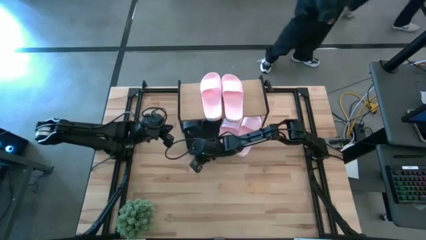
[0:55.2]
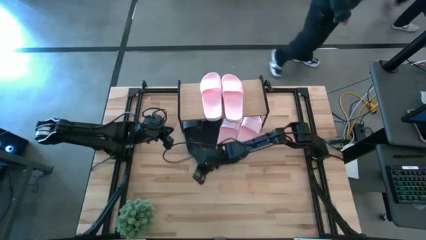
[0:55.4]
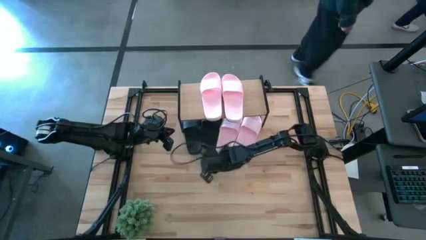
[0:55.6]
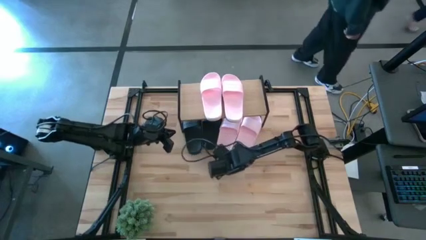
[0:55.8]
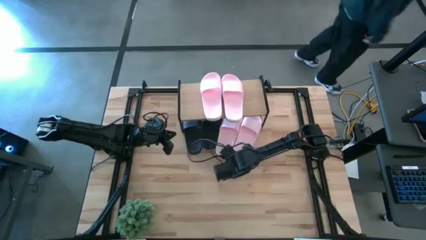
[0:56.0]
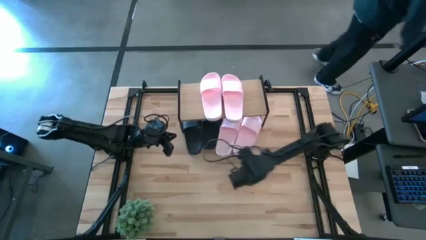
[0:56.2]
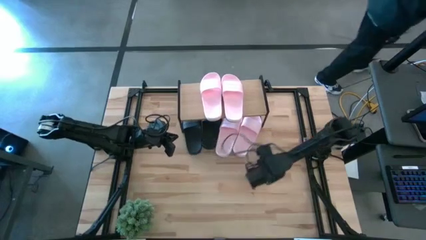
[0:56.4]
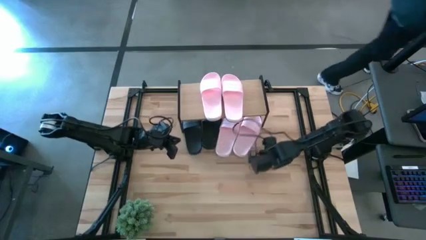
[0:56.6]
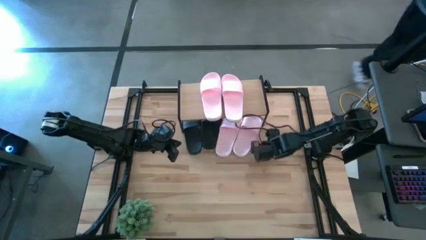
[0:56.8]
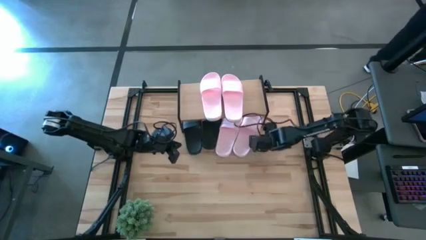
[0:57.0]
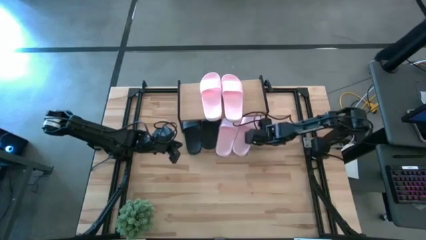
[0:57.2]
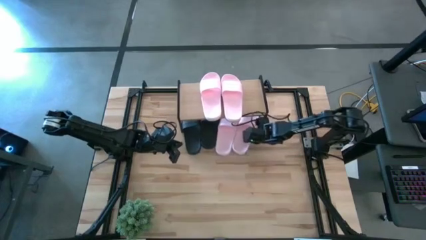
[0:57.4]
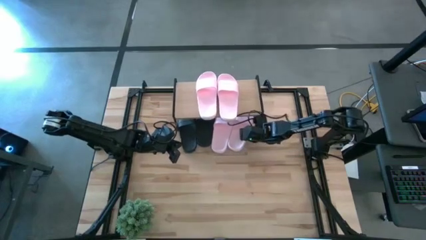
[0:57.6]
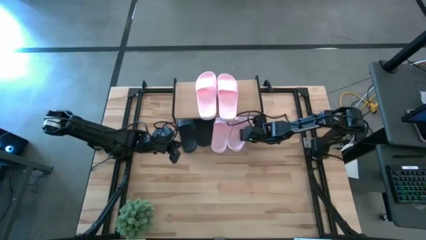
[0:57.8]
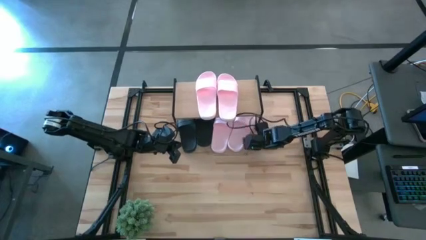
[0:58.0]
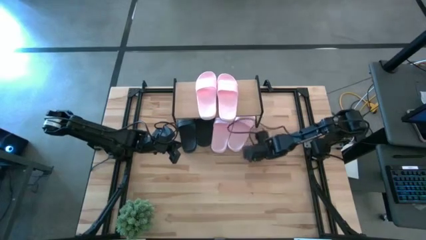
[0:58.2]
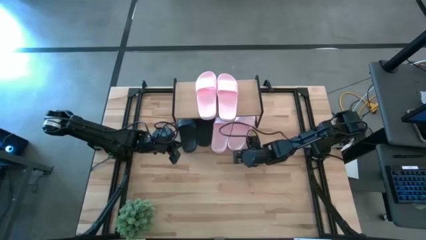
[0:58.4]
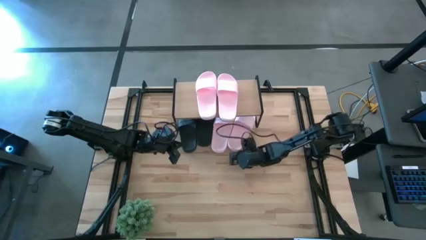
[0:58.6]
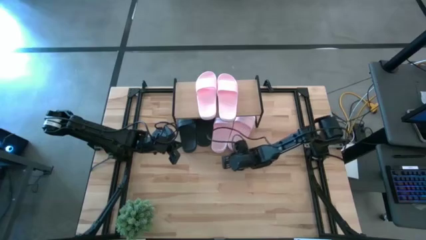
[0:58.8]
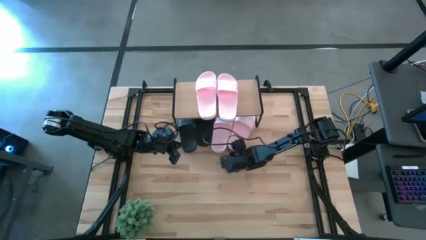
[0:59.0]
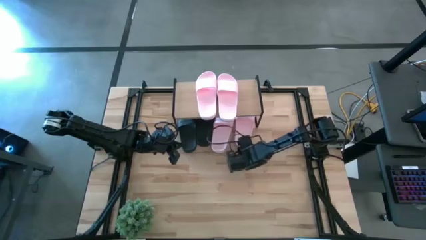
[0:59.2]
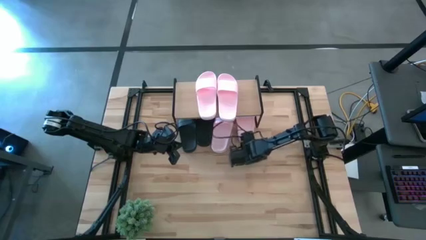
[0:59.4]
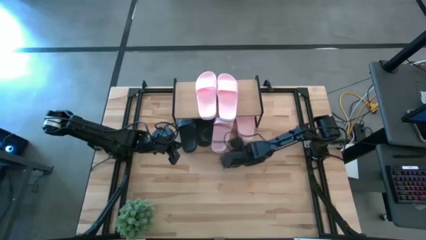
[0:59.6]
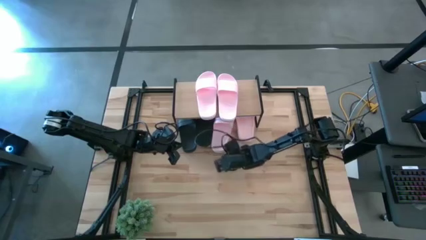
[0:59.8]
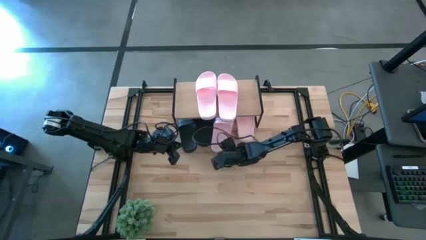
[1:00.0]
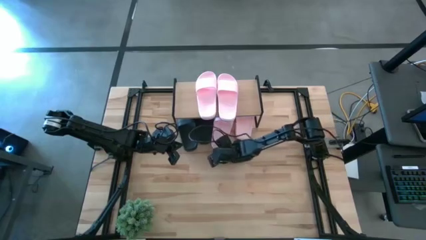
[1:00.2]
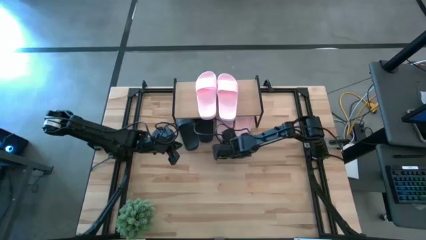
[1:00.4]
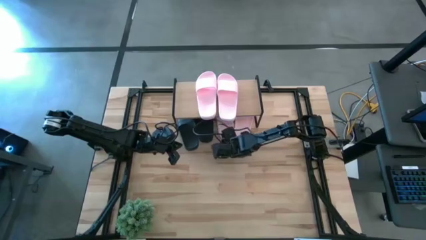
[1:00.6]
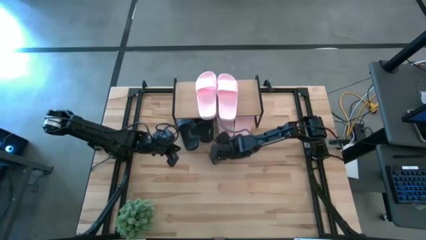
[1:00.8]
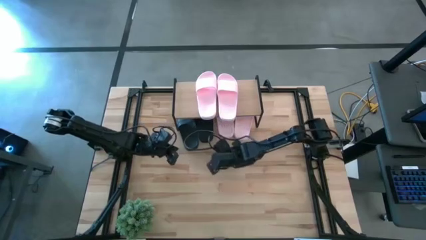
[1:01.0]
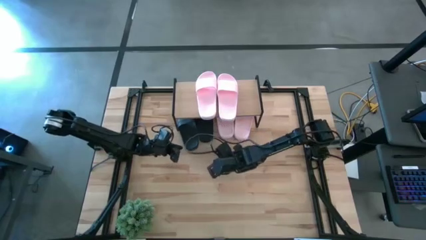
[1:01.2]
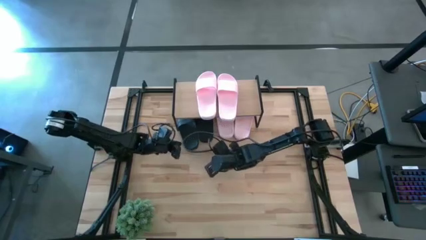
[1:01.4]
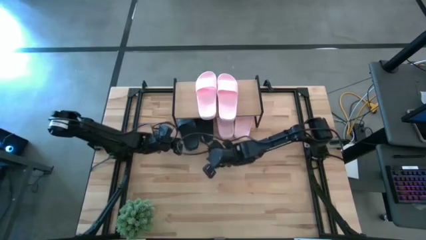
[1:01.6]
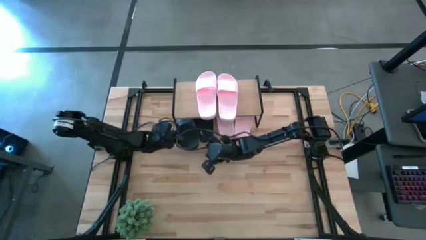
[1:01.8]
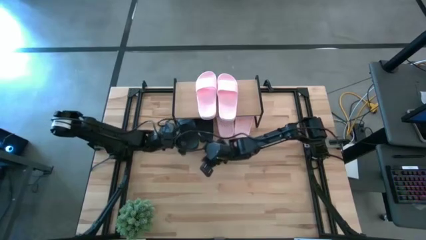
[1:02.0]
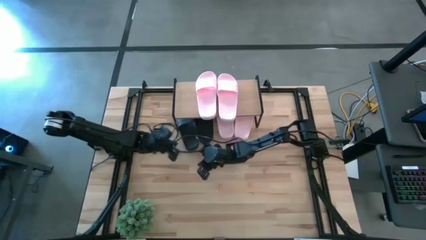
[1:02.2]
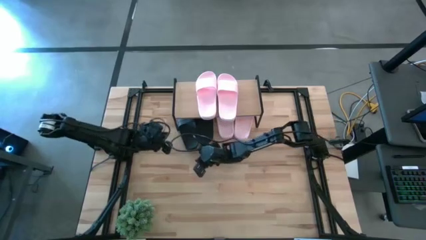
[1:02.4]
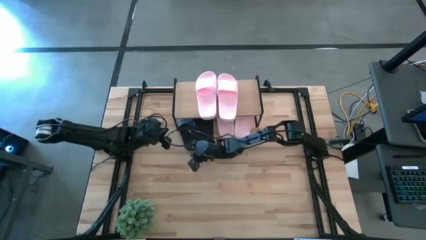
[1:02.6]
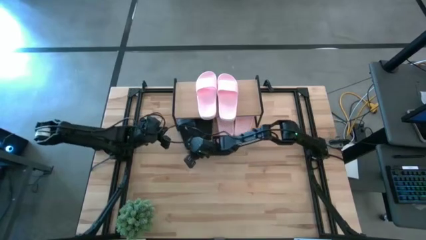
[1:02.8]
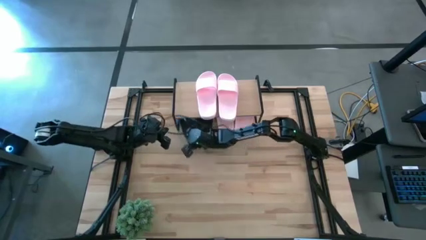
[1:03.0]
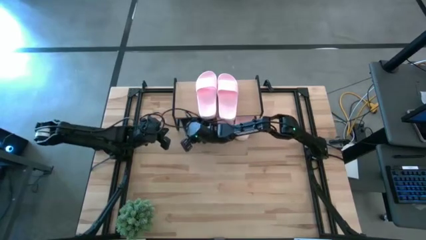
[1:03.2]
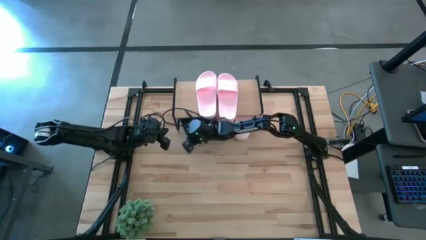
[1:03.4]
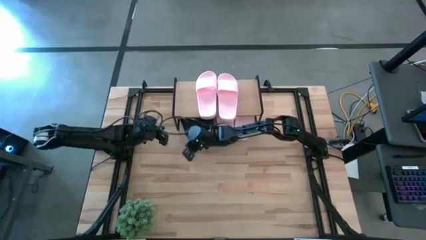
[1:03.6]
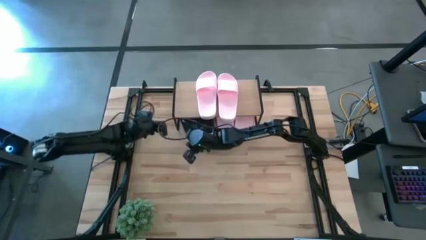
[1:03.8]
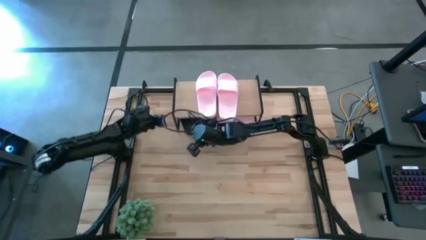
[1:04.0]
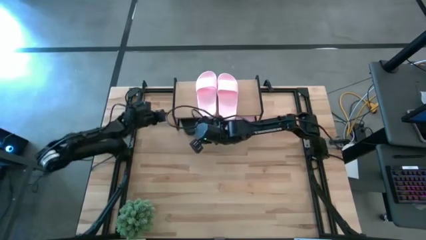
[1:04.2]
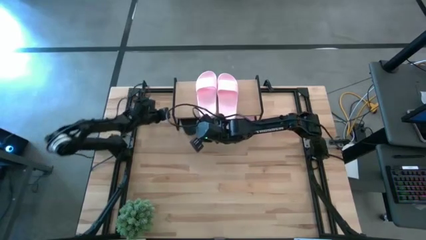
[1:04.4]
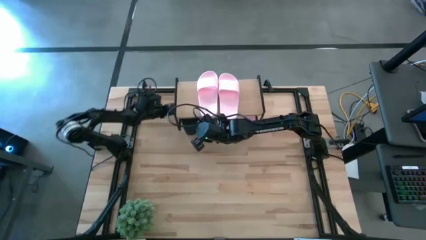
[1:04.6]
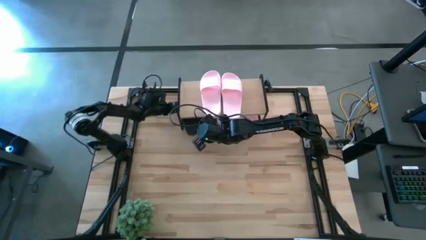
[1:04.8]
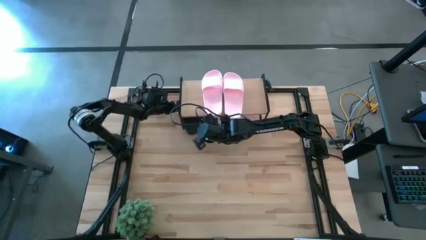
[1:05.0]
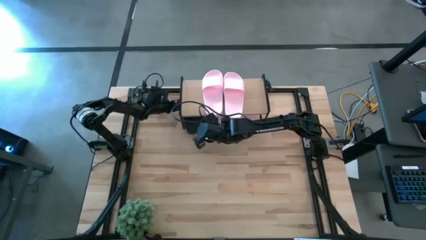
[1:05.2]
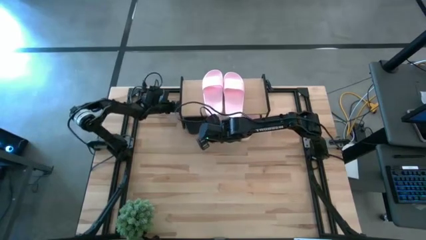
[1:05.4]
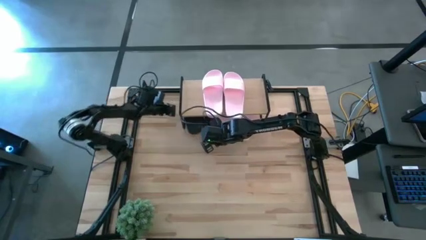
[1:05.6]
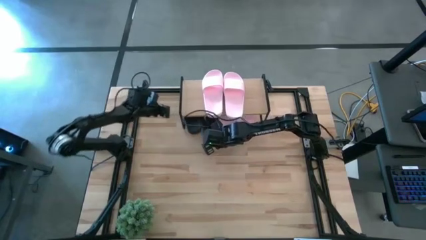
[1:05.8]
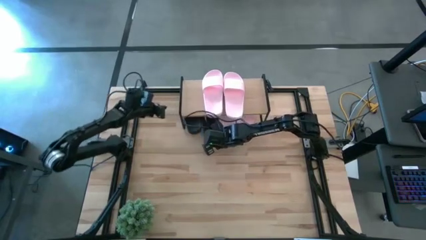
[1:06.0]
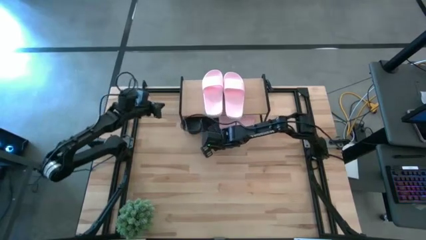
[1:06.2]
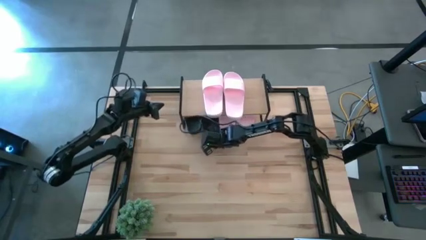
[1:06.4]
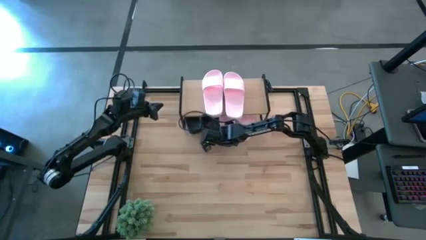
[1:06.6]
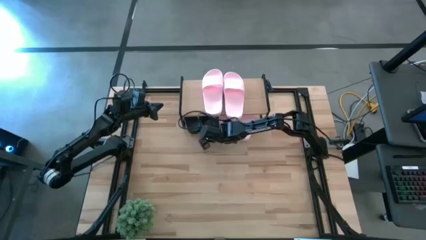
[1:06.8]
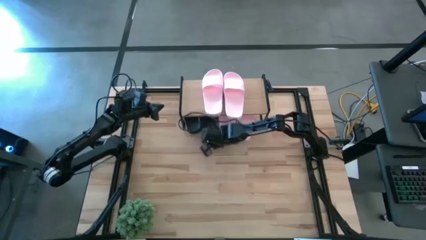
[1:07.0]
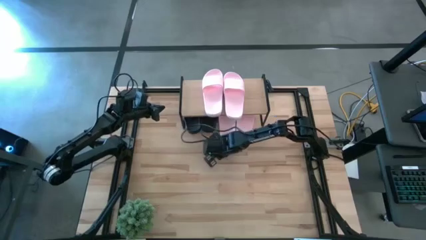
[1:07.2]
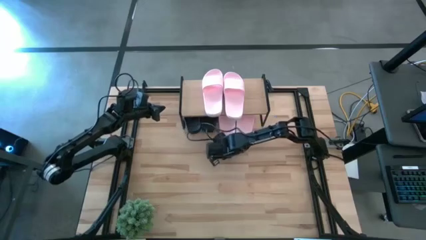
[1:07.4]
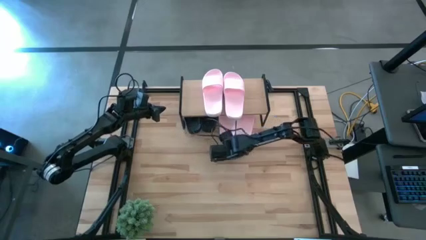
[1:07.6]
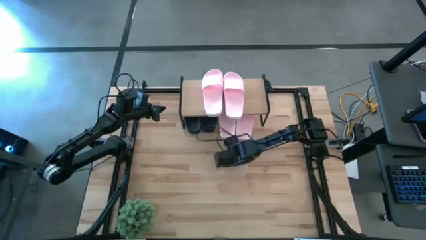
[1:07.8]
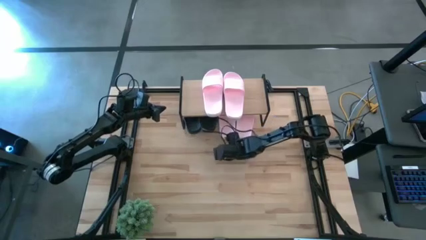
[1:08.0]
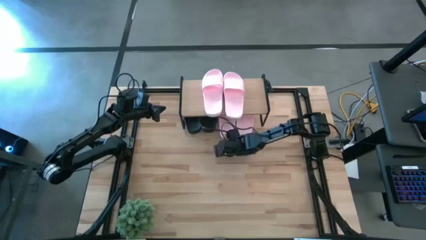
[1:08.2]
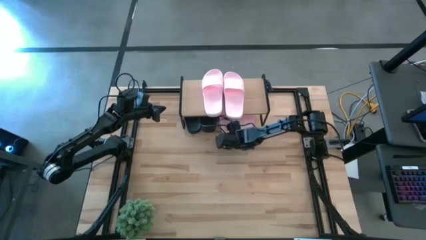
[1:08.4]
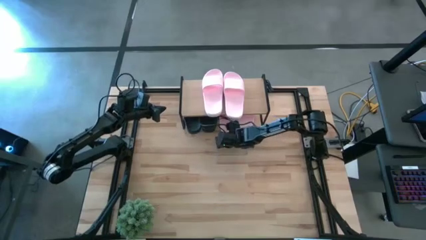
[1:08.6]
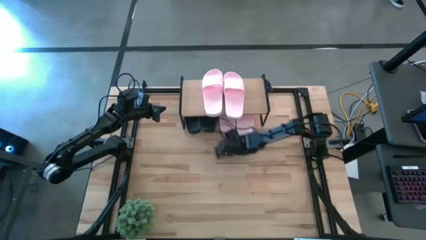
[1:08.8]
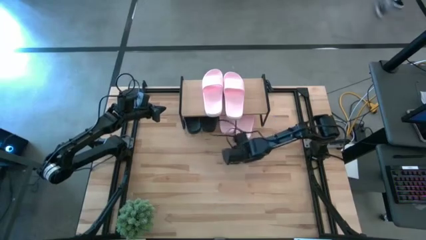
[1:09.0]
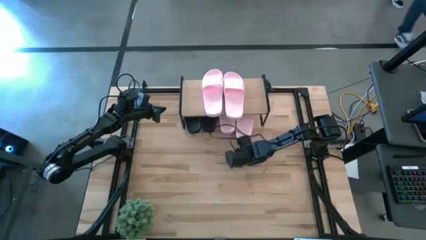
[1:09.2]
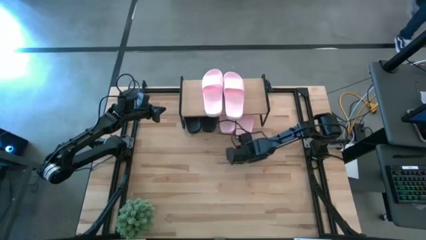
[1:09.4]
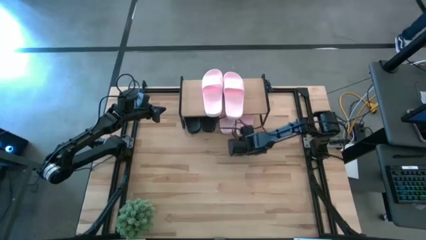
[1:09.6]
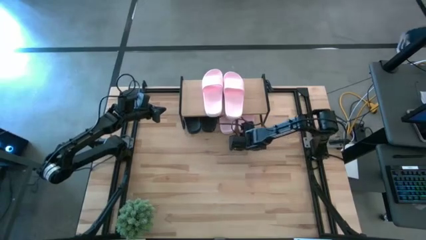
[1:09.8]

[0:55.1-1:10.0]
Task: Pick and place slides into the shelf
Adjust the sandals under the shelf
